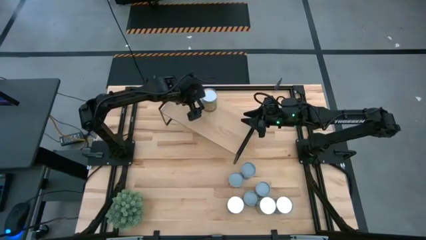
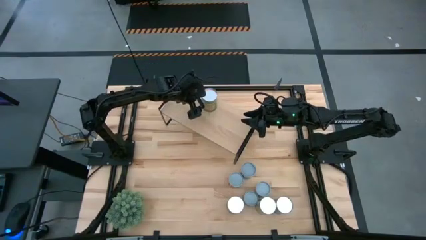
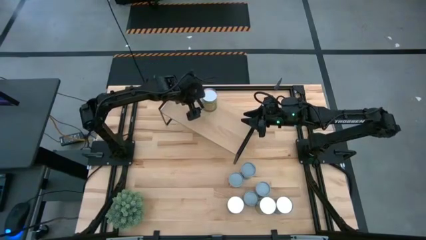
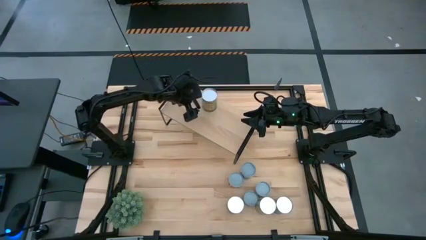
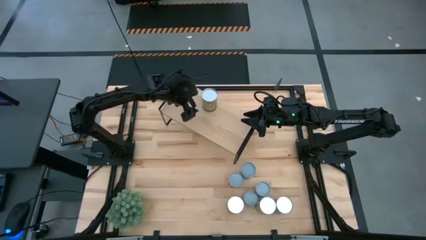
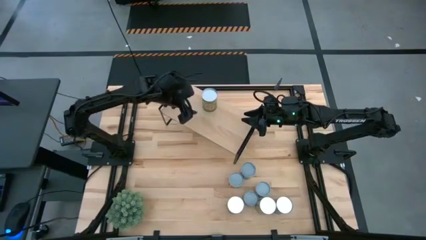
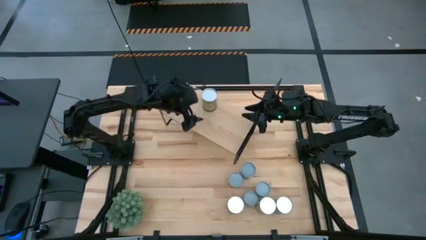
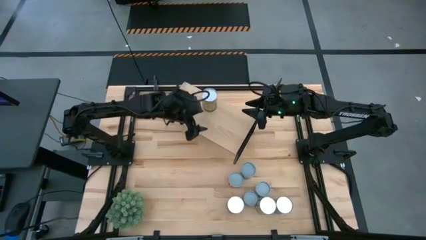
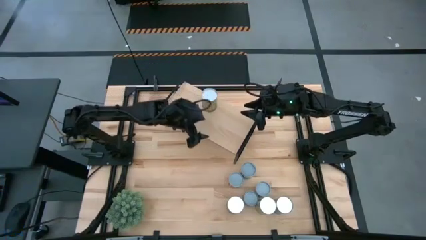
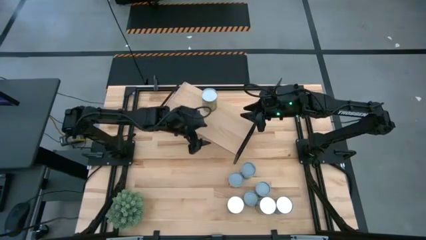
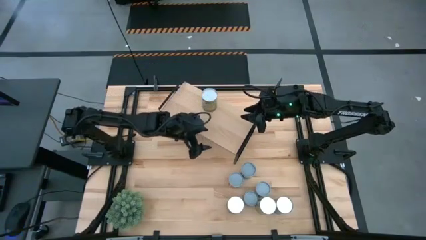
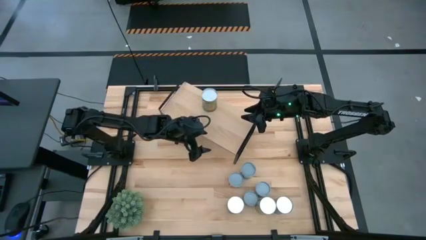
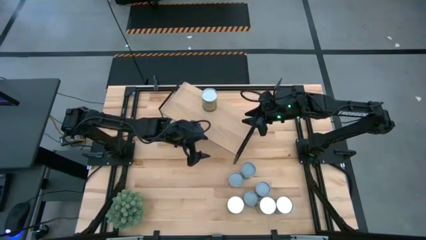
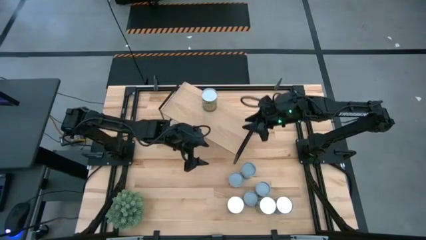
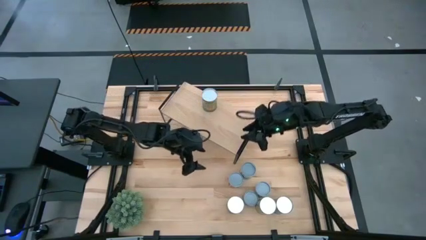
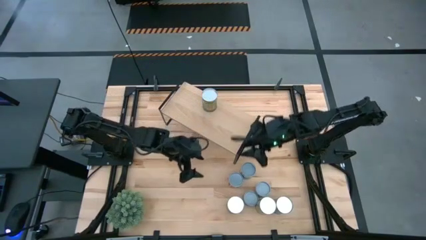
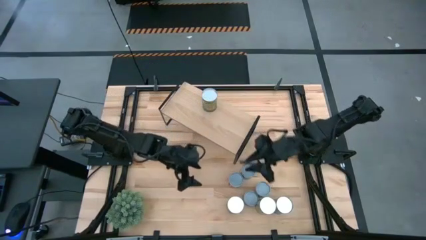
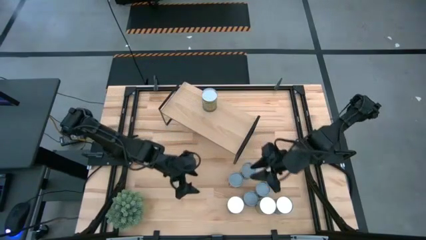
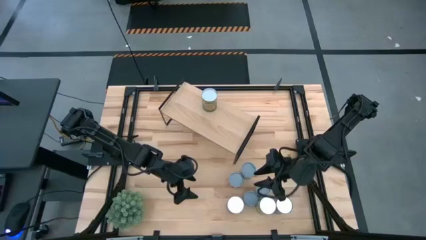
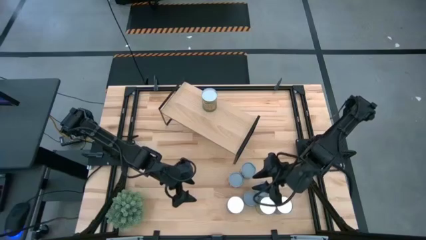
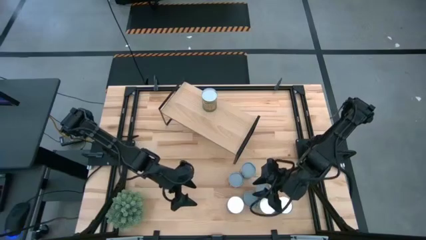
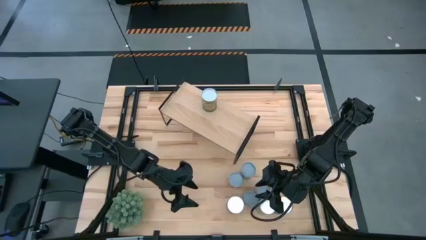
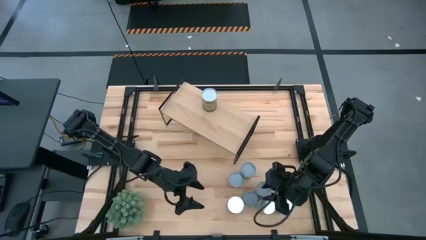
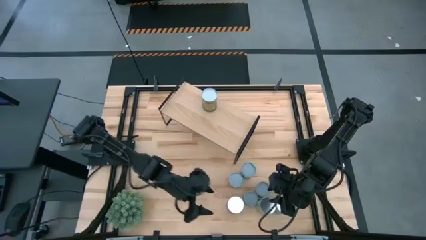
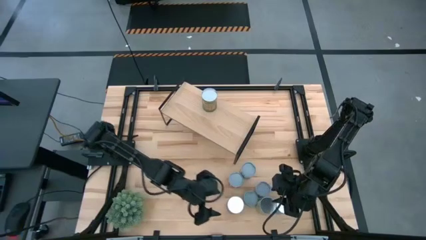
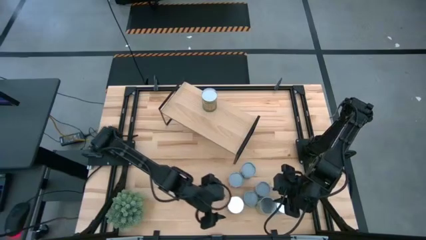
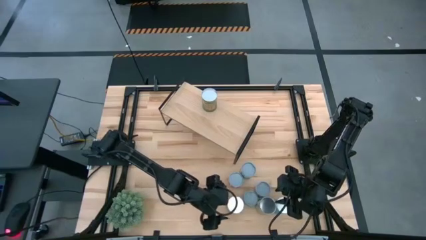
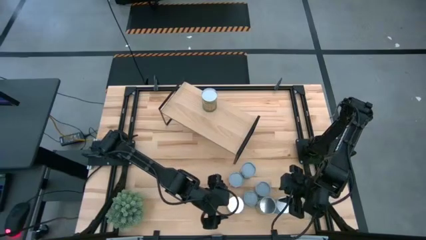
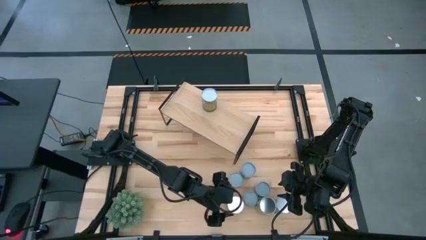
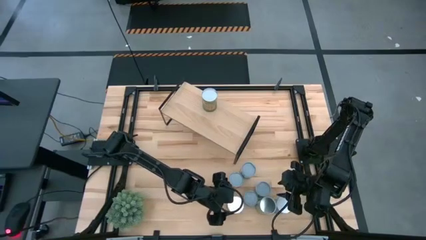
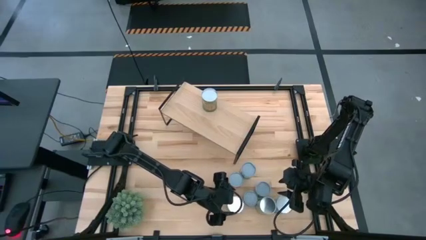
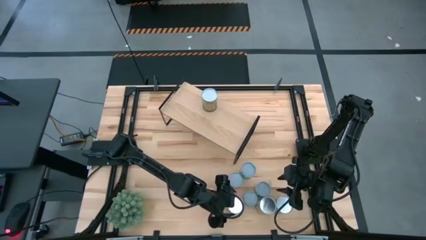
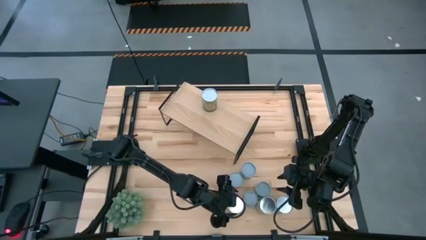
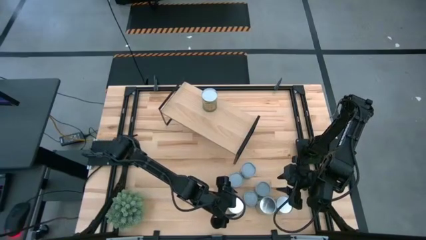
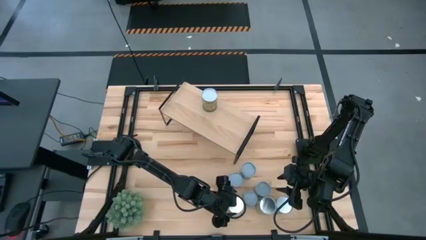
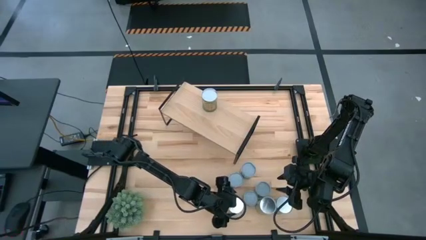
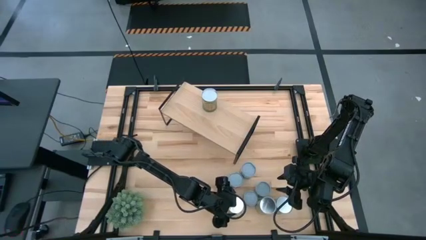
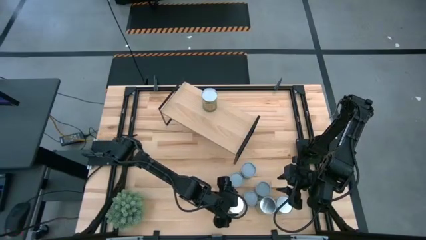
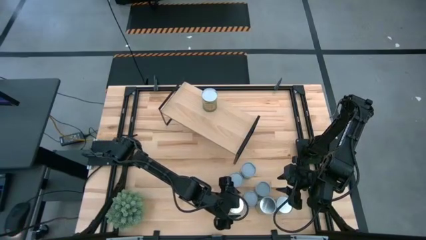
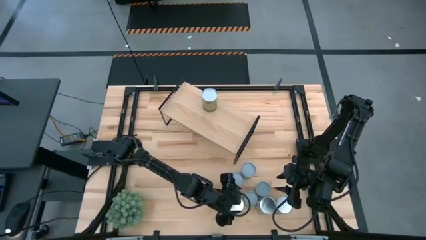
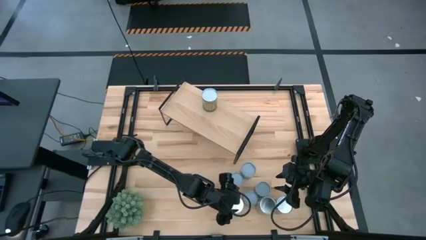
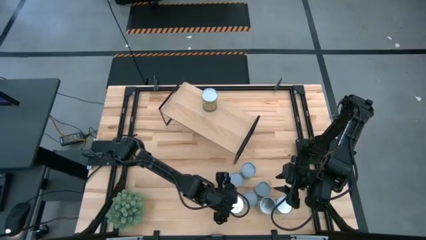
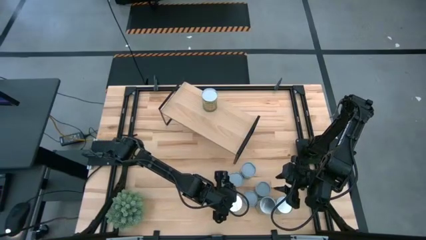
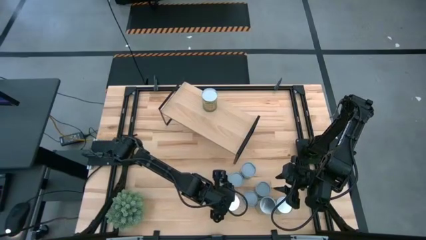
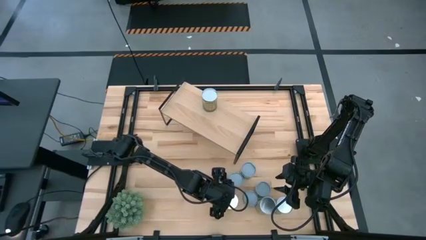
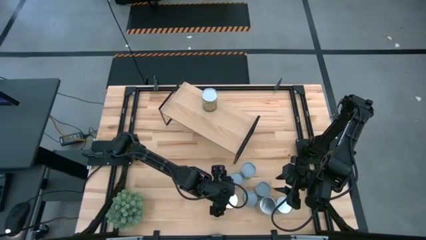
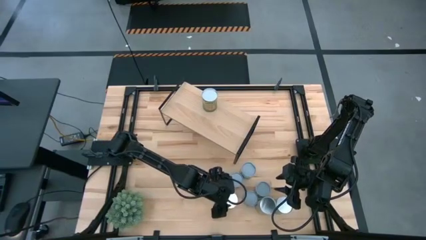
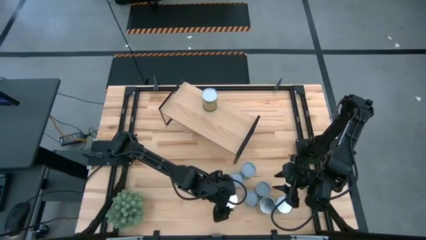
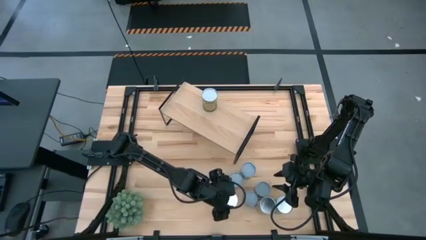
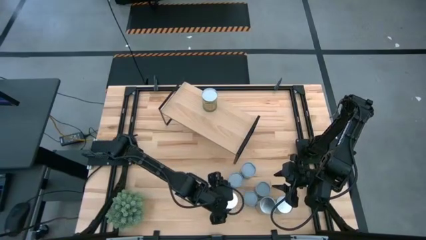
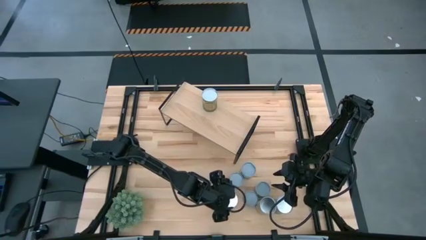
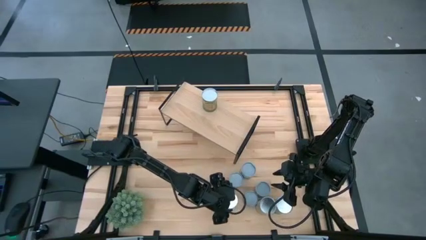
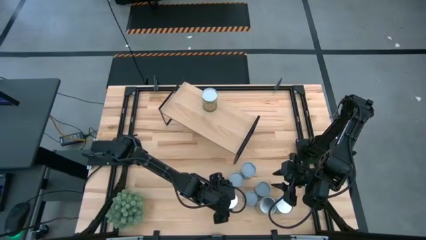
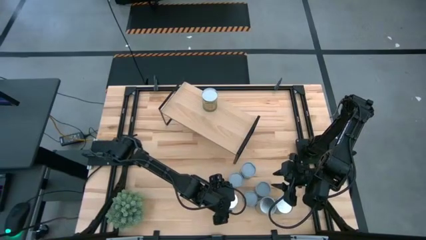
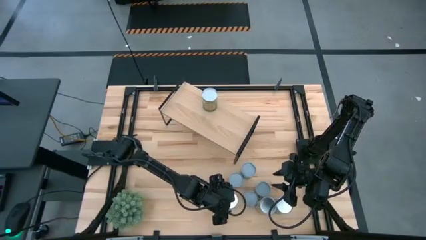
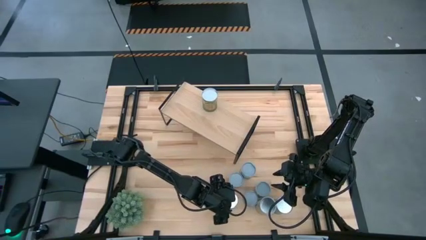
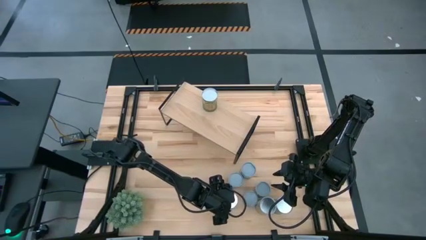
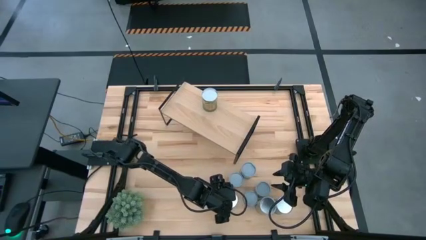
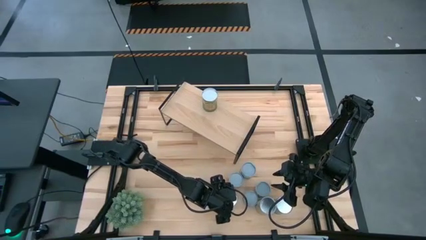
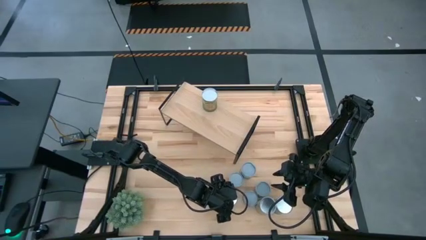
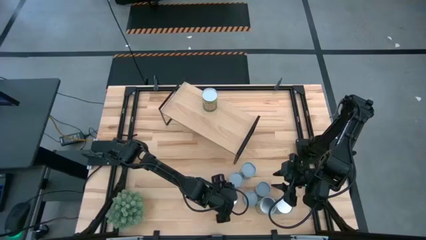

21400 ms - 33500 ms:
Task: Pick and place cans onto a shelf
Put the canned peaches on the shelf
